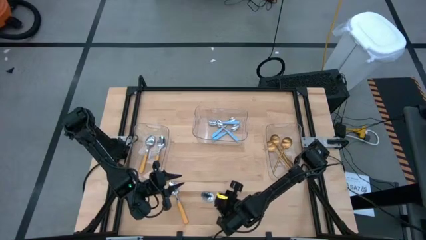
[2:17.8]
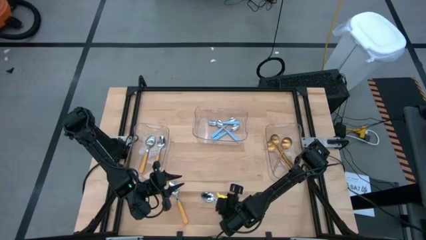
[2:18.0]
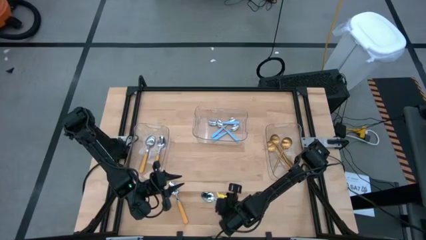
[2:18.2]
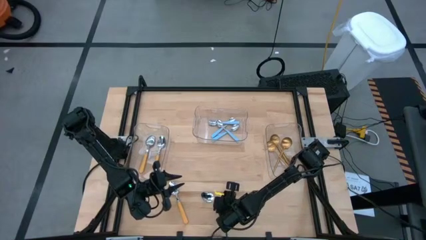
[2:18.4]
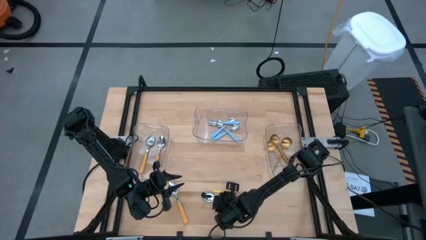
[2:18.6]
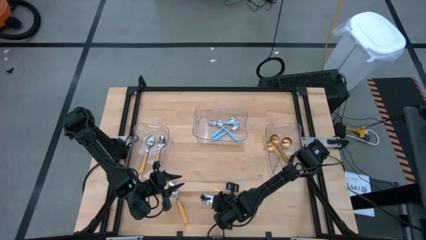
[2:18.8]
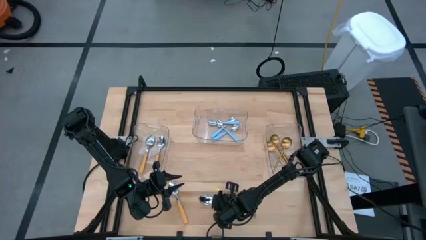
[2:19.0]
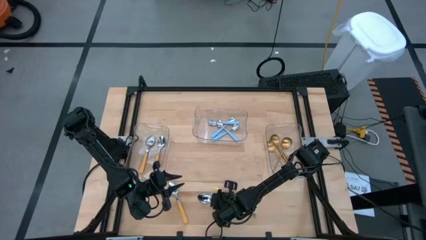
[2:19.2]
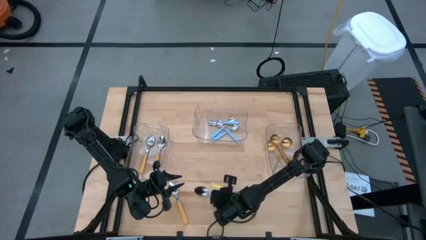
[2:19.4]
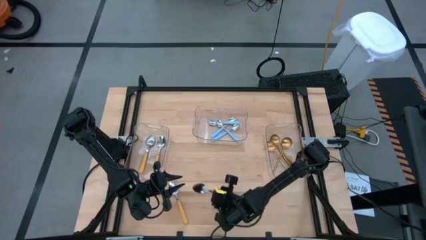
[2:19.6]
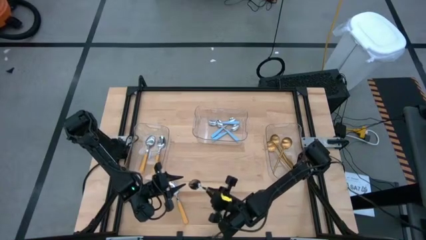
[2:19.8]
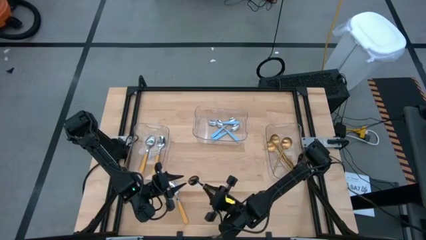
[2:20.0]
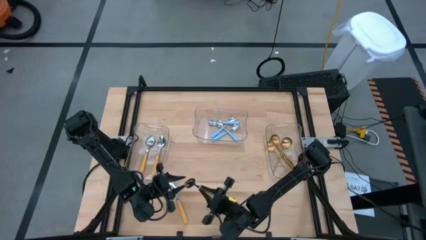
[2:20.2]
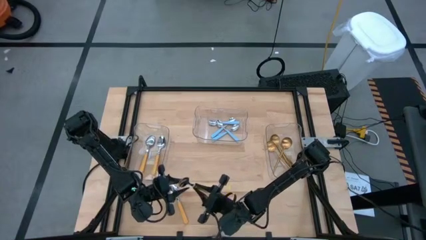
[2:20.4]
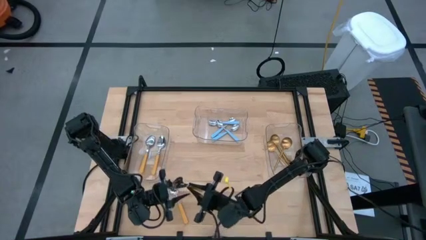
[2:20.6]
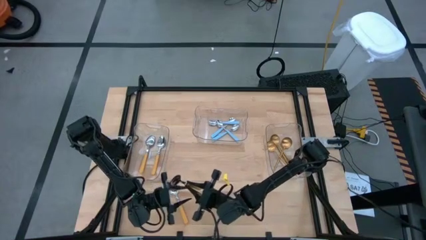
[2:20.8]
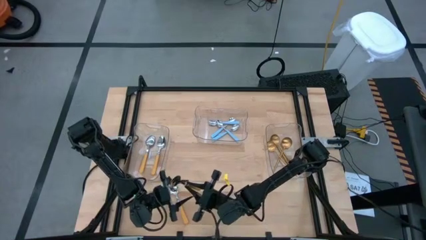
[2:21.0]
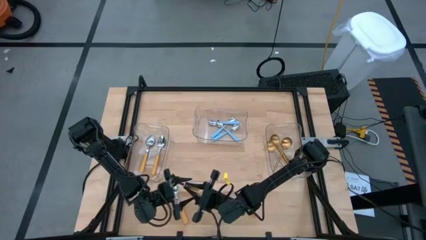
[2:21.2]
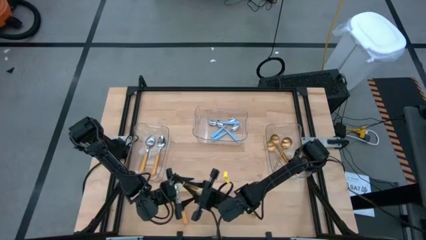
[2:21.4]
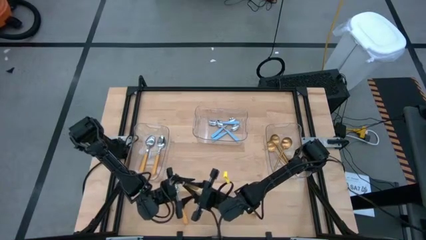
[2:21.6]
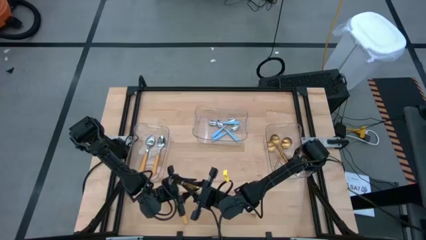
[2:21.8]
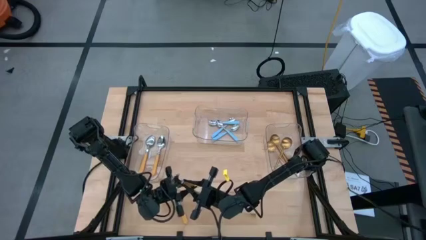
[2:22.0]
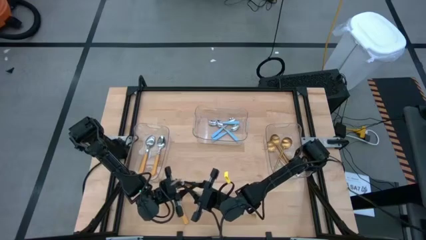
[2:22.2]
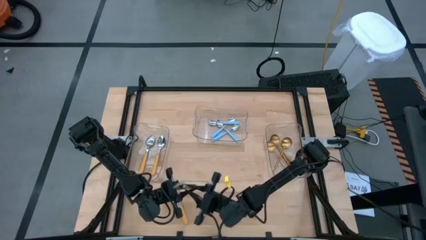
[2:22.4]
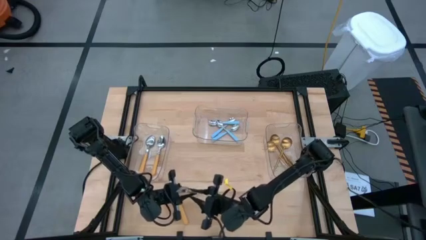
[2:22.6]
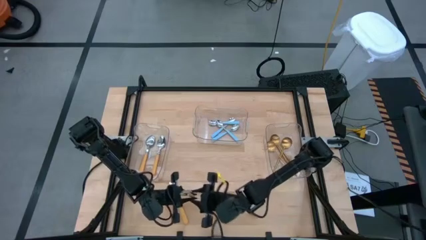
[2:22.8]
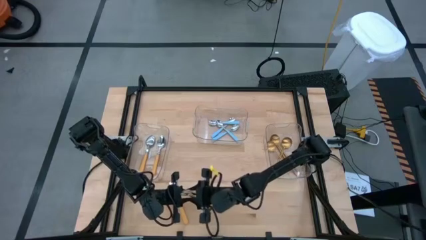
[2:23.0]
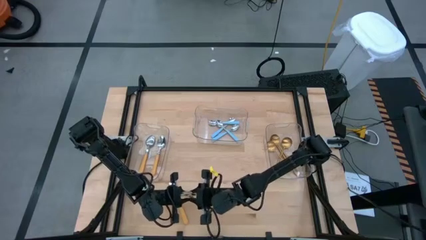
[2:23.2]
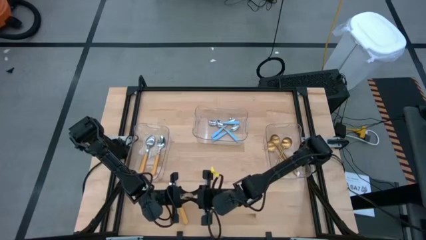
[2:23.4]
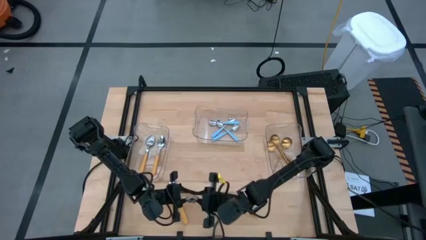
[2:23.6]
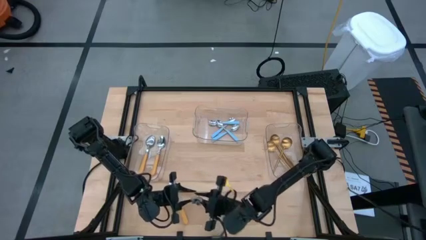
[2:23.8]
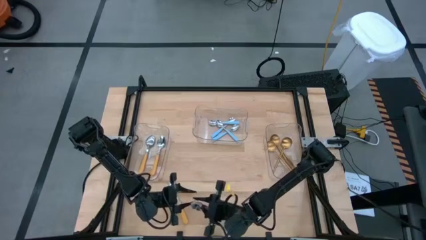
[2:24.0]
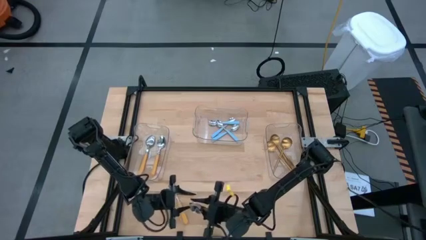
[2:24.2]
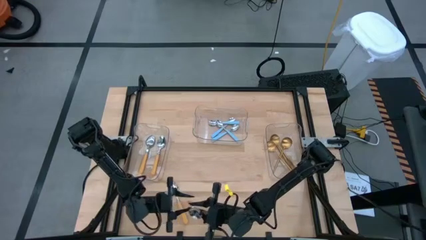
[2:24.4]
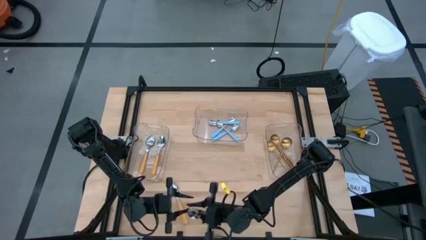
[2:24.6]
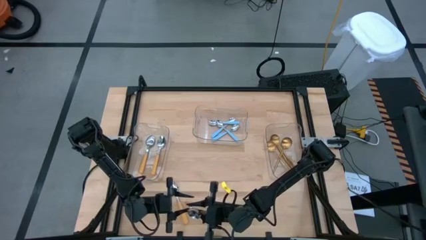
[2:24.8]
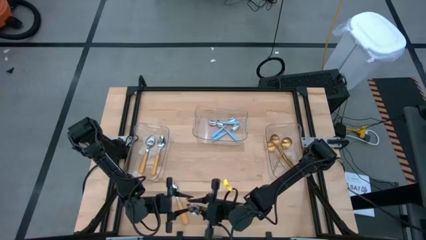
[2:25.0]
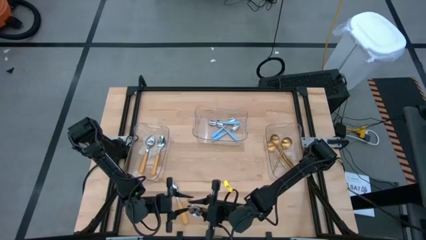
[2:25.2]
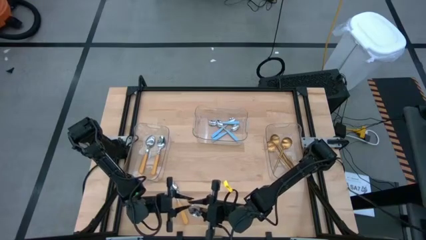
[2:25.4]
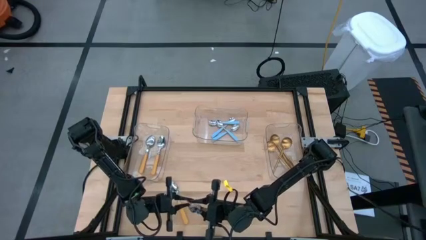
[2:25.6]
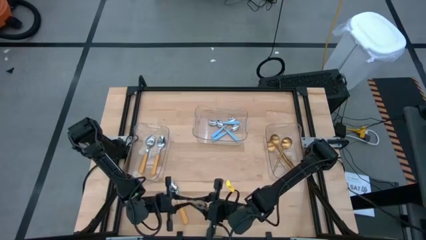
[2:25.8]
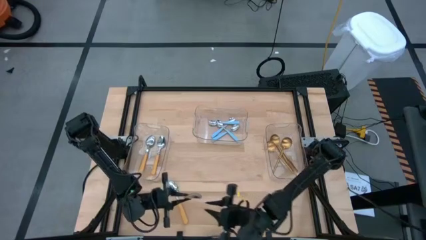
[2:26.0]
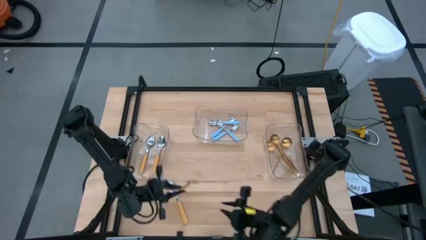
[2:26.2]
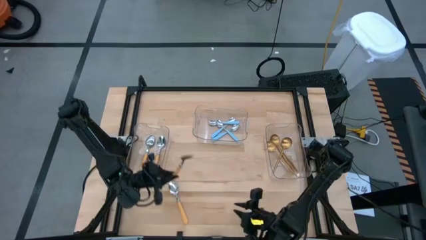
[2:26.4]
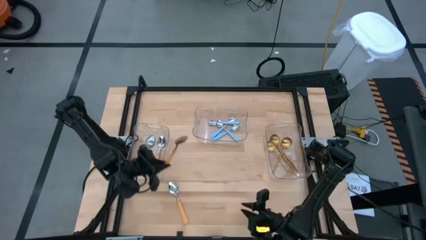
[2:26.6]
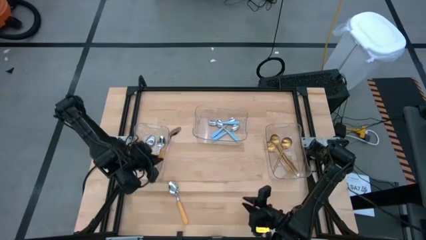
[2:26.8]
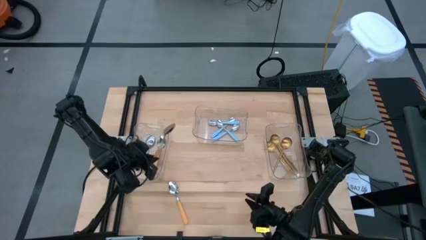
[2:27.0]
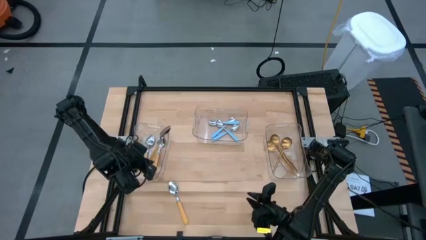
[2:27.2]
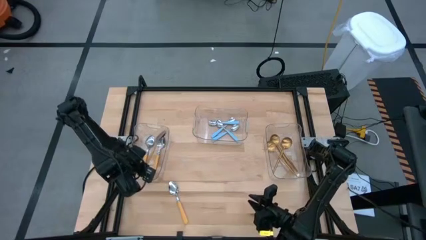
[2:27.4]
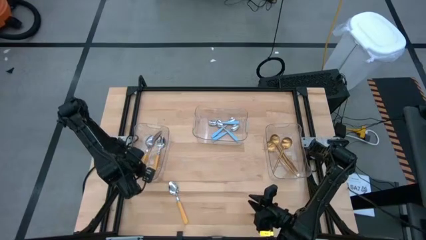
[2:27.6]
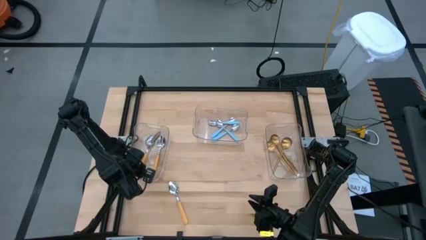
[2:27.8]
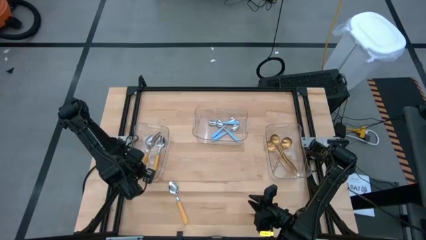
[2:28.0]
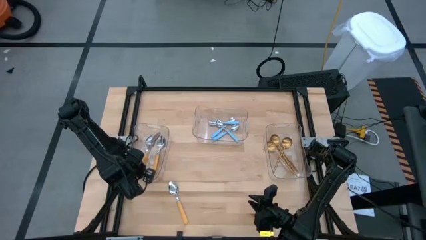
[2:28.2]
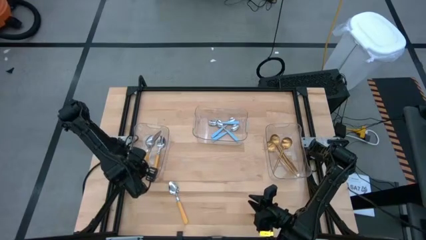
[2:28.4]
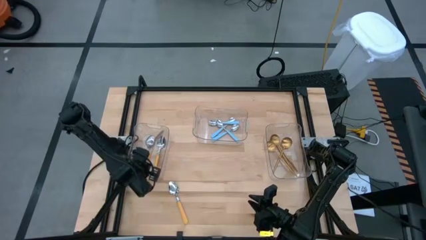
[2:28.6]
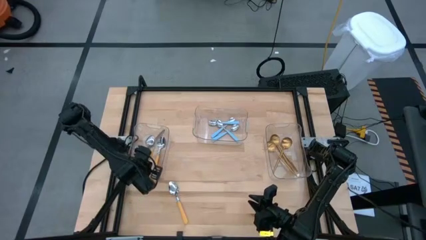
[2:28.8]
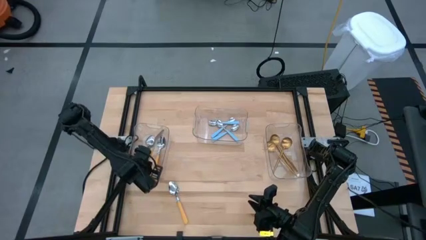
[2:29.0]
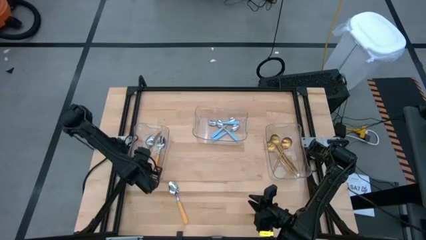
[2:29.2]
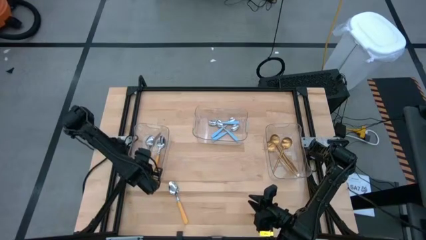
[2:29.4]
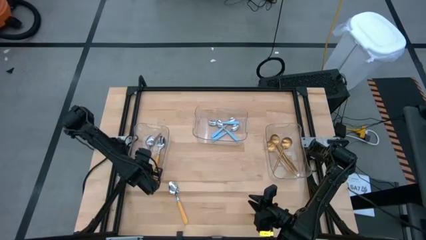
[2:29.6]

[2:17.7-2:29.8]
Task: Sort silverware by color (type)
Put the yellow spoon into the left transparent bin
